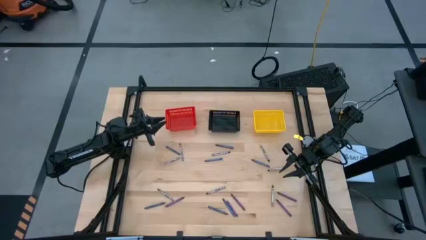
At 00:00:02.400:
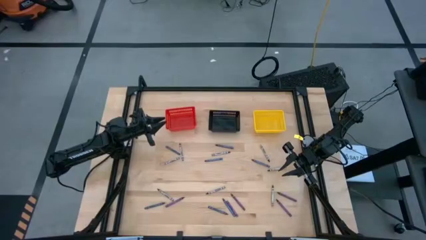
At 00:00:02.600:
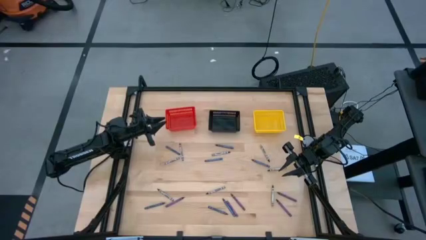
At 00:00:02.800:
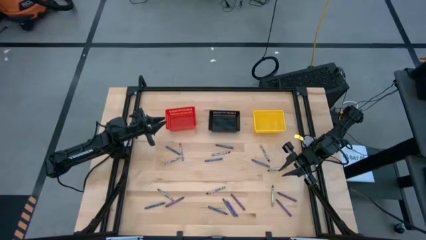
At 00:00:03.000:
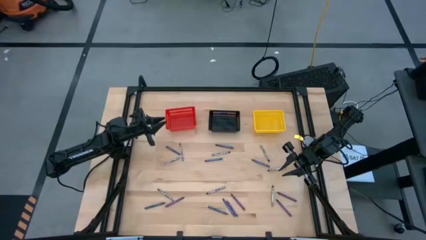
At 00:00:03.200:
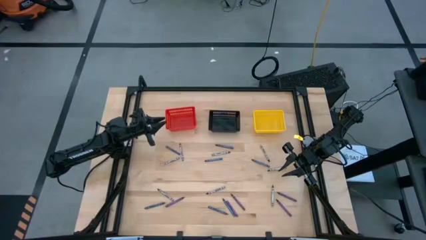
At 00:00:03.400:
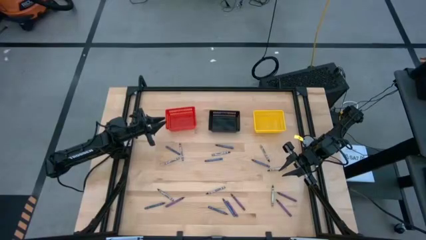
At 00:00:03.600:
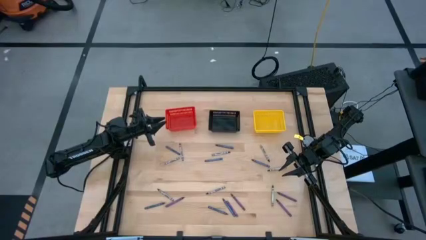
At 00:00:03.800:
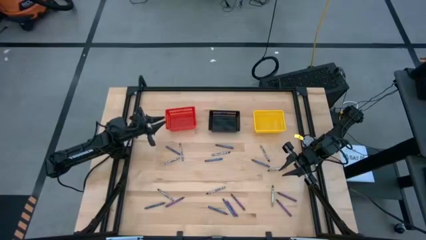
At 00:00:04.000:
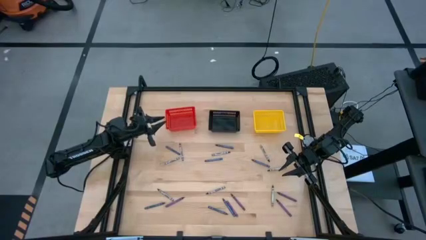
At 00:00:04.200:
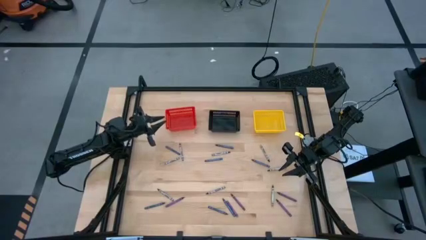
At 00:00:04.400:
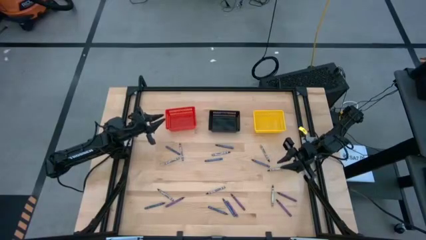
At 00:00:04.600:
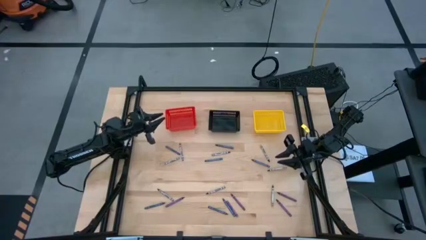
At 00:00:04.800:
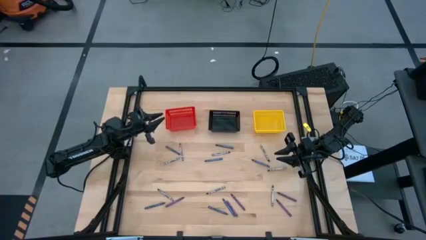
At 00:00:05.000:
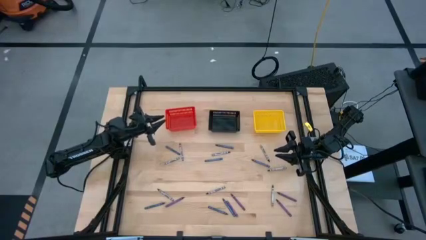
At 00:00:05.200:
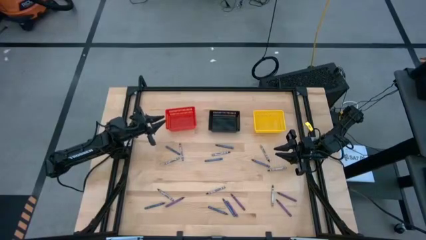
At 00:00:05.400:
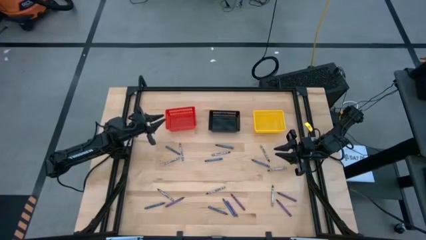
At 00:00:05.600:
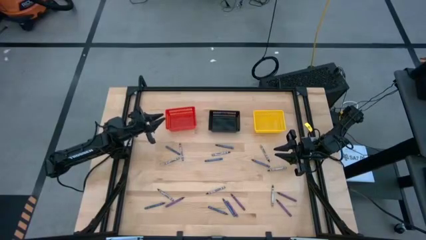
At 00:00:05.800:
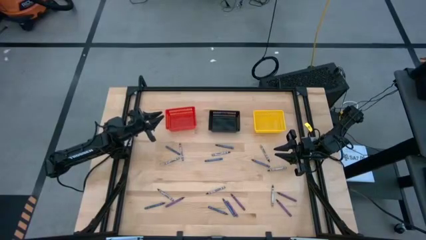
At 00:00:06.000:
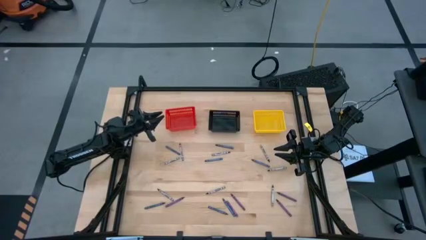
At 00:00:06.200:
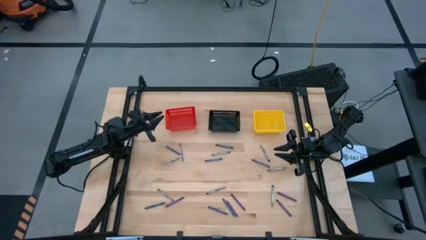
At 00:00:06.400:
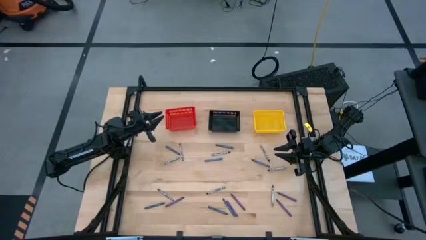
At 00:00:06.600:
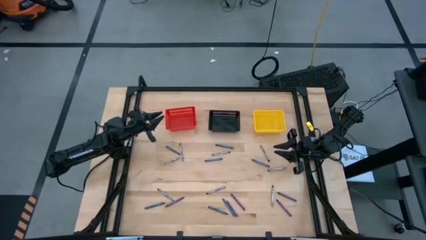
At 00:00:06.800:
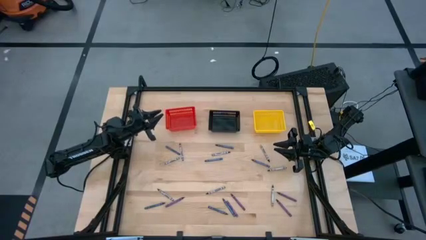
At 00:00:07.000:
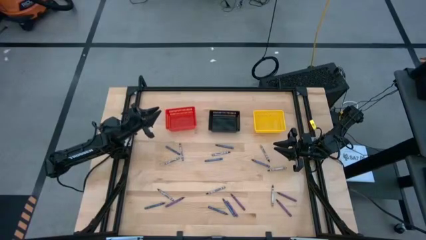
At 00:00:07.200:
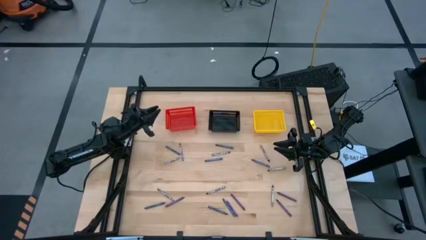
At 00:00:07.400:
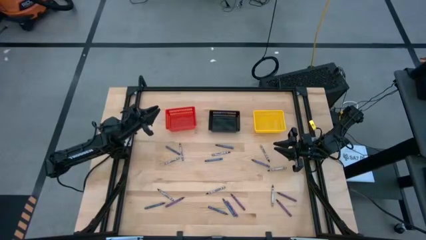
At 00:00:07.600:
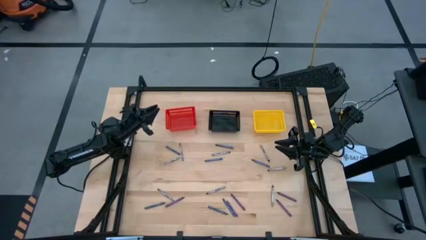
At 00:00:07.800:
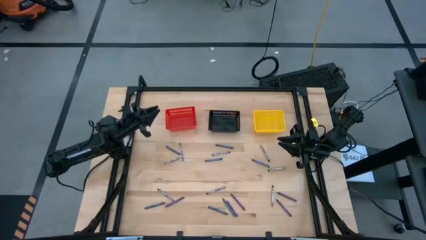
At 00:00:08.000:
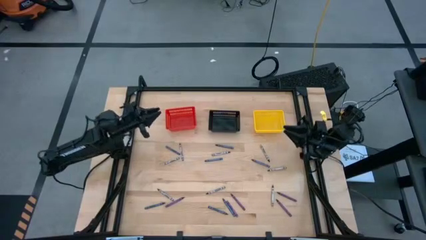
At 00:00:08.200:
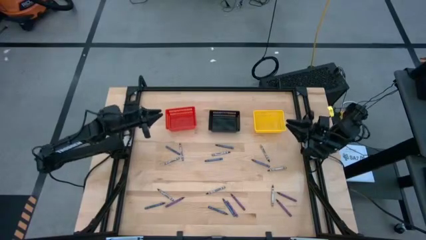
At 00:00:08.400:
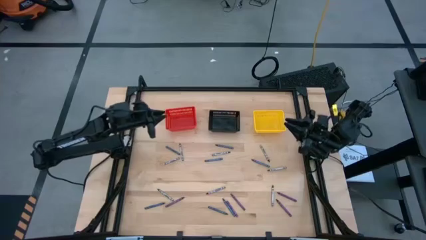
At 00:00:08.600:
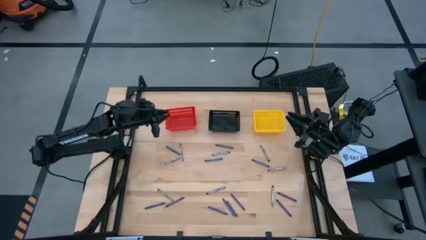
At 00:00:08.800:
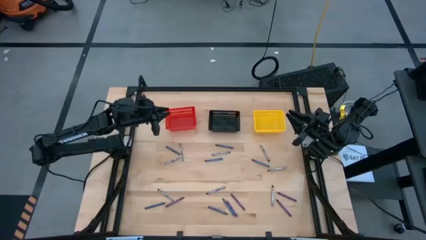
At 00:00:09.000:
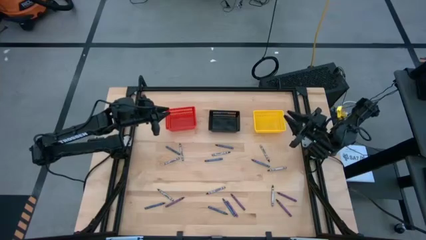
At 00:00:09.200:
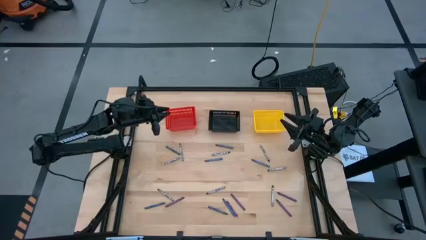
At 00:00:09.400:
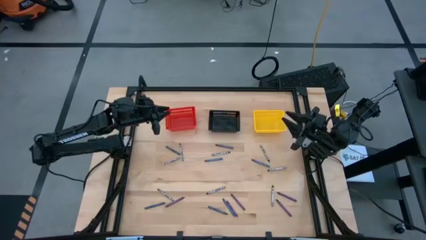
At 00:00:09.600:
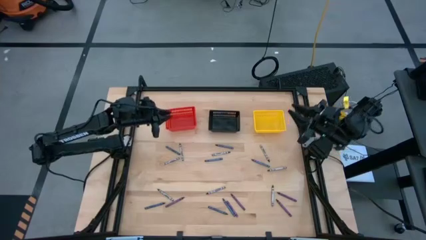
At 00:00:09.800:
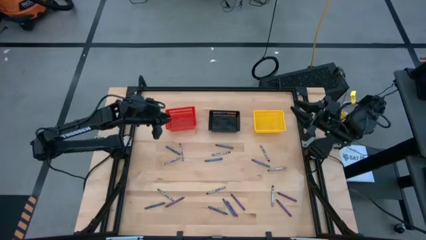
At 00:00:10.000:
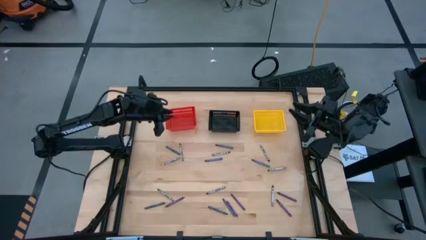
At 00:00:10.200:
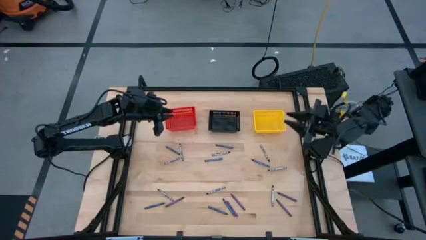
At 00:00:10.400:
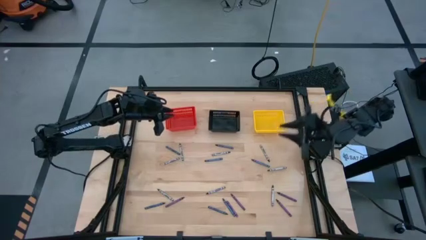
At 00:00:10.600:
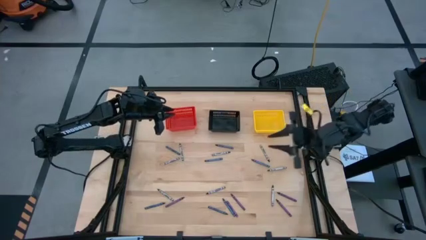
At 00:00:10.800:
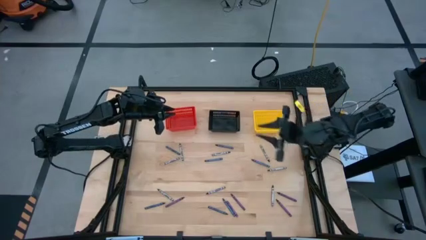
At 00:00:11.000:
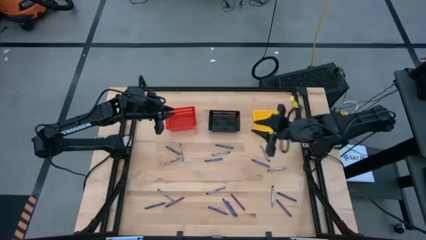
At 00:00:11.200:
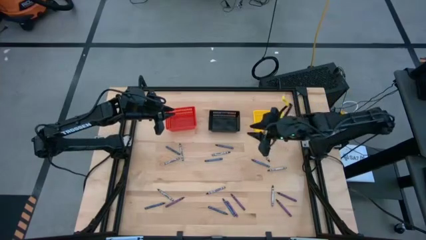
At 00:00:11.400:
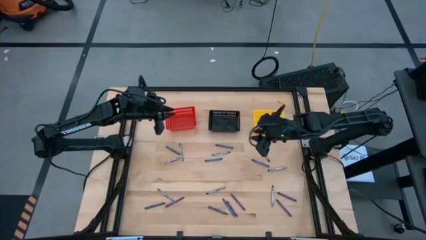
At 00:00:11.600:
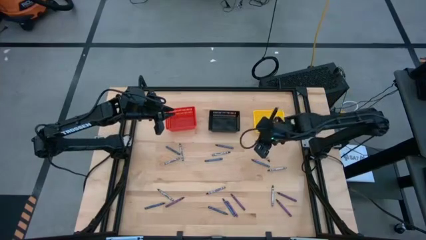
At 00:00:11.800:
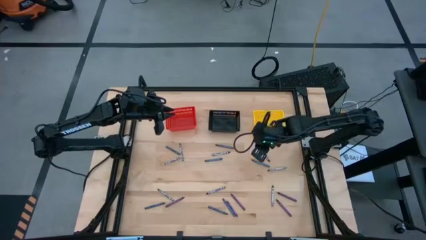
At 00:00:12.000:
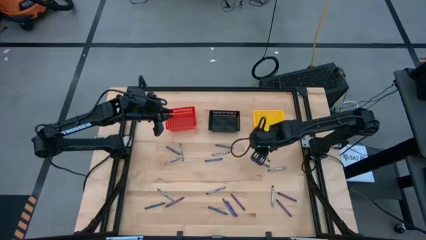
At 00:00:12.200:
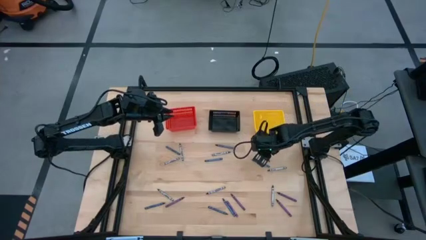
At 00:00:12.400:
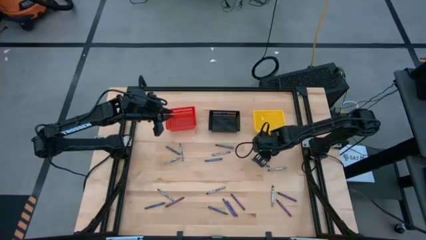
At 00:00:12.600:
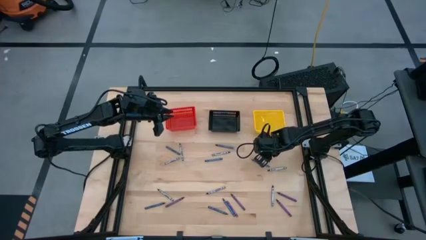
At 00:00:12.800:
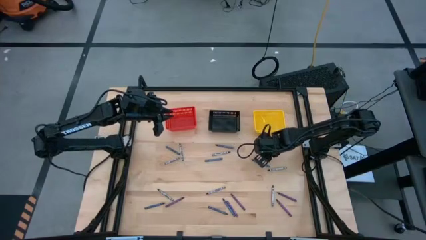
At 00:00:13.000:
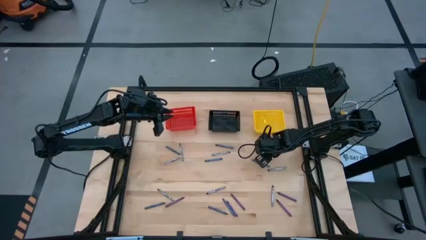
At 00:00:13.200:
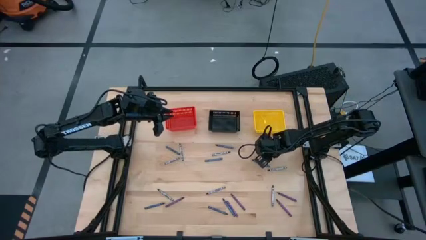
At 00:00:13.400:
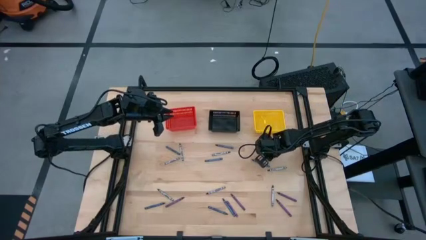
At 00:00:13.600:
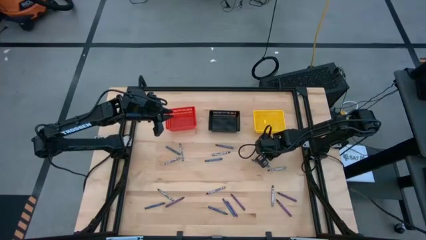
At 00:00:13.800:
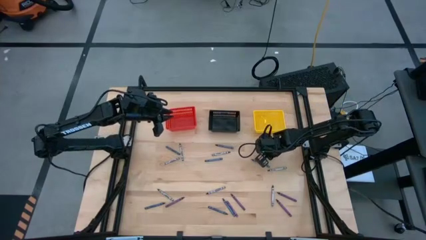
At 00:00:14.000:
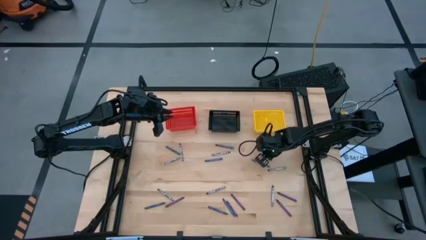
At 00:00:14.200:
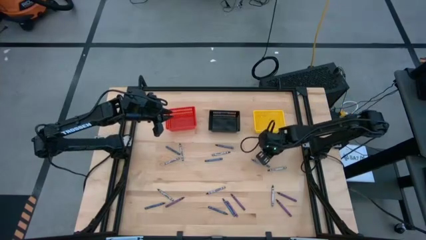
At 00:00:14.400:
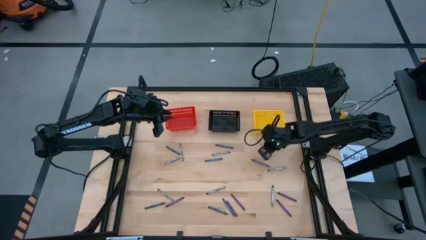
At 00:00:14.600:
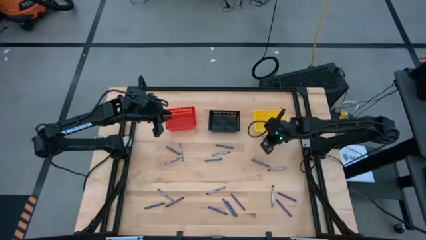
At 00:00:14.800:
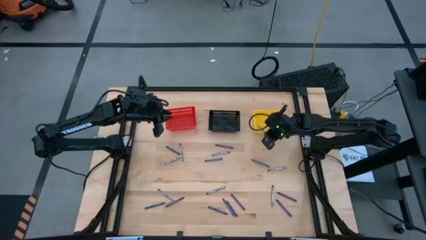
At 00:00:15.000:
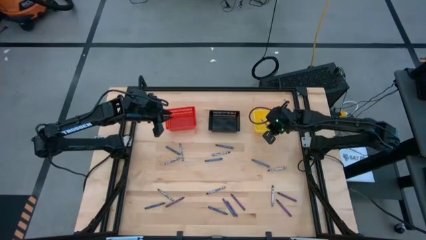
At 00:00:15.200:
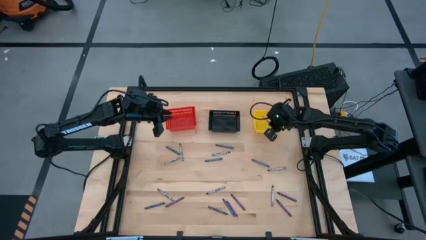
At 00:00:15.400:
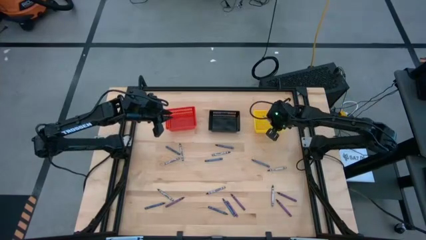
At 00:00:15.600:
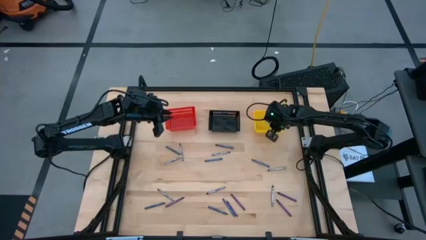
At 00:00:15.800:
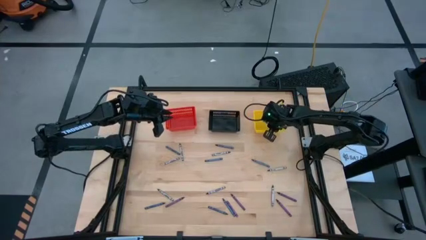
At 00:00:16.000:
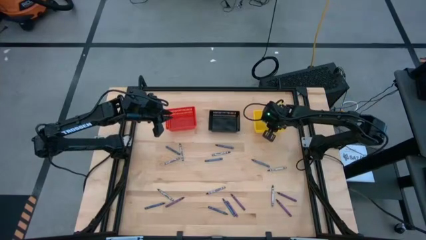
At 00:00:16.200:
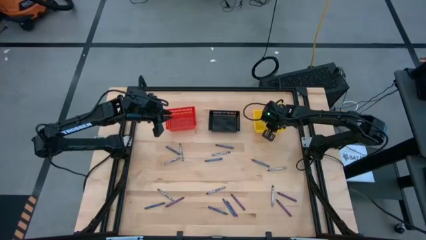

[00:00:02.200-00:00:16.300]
Task: Sort crayons
Put the black crayon into the yellow bin

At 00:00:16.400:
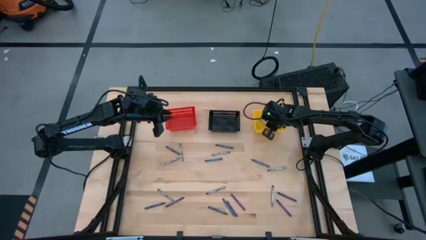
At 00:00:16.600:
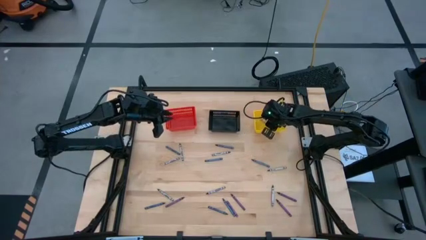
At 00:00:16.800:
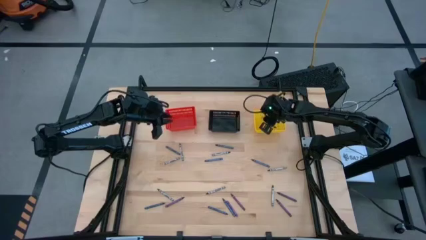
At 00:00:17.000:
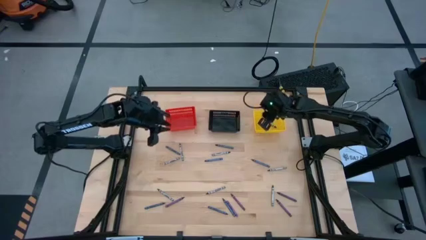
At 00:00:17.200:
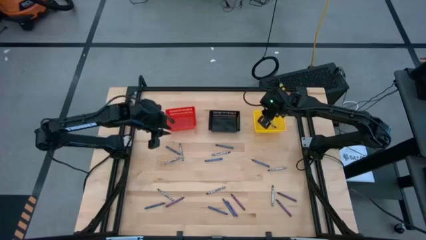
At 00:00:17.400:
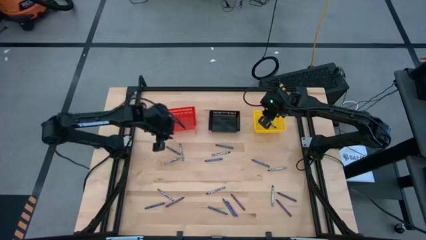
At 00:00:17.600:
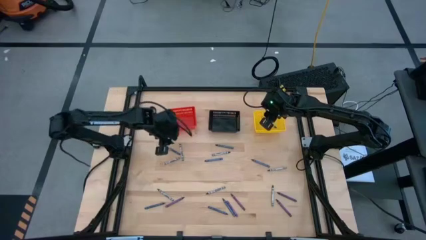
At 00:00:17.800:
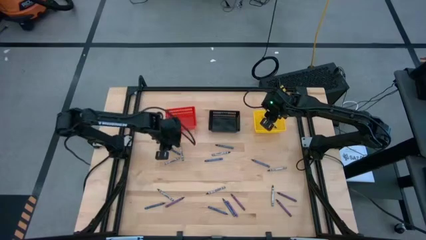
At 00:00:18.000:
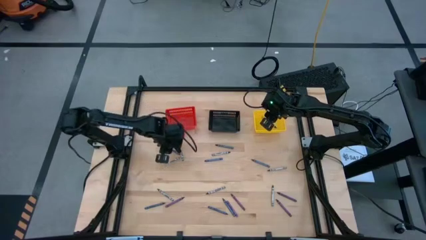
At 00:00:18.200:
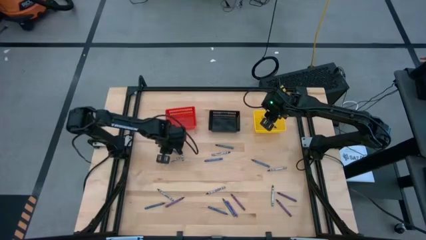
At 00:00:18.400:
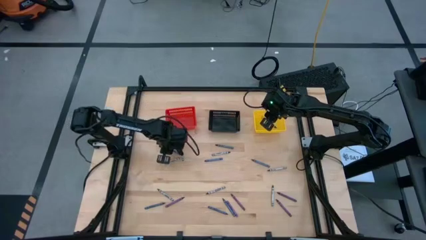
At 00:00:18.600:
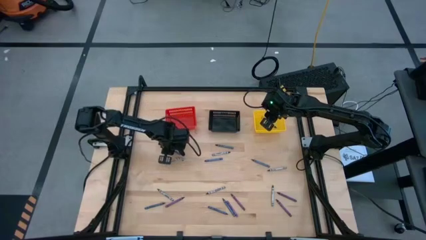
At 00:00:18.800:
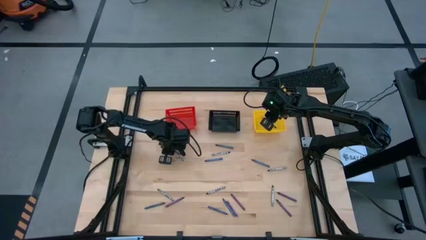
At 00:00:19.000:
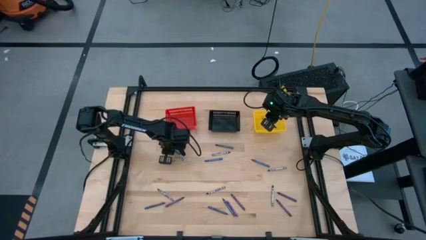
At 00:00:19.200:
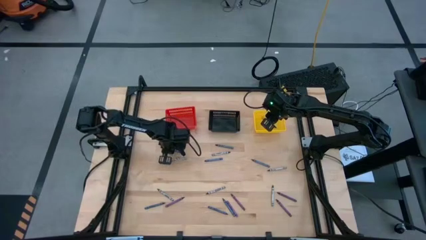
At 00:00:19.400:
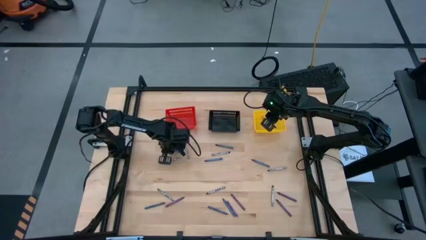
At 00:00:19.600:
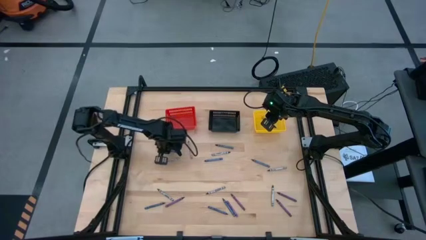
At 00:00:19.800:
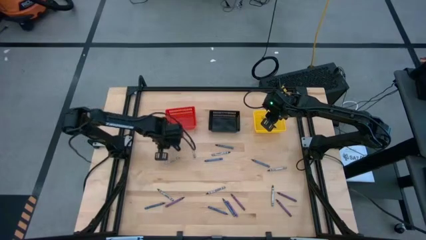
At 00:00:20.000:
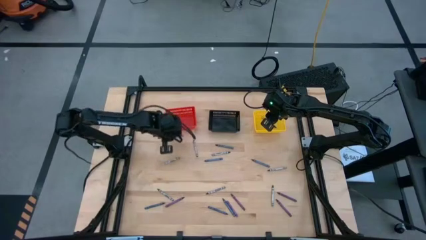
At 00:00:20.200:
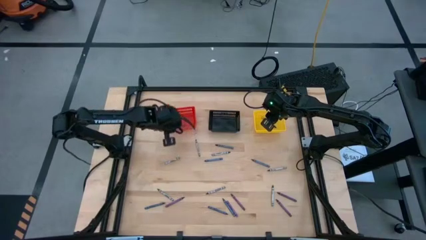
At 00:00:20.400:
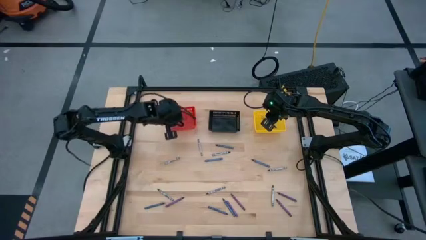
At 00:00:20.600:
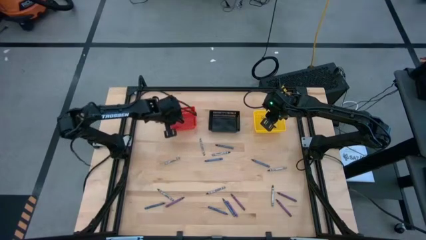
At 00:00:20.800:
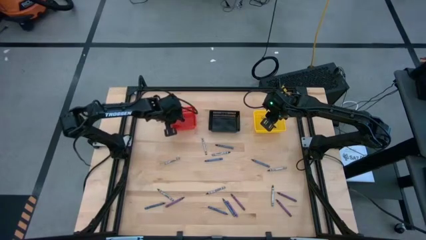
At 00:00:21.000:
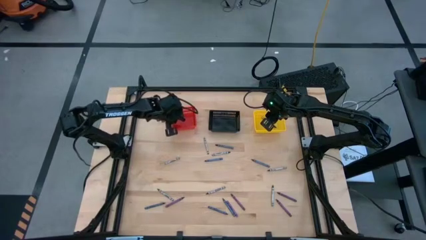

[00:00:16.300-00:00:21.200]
Put the blue crayon into the red bin
